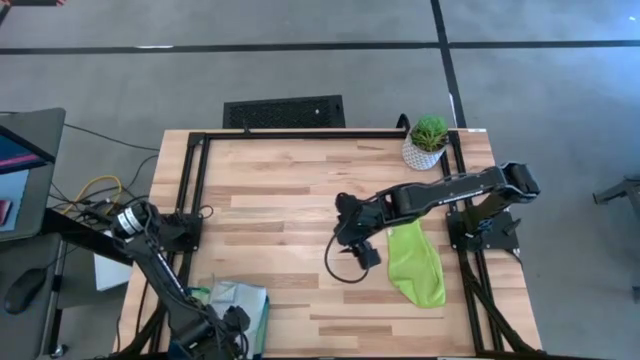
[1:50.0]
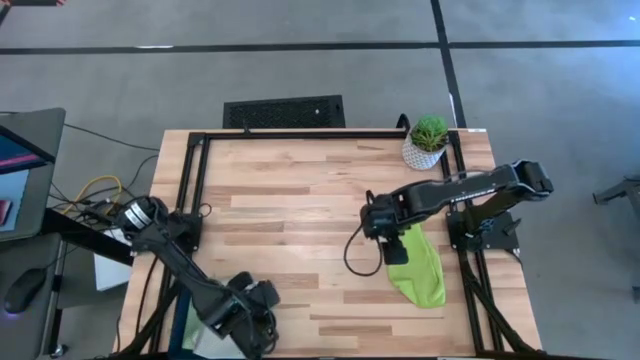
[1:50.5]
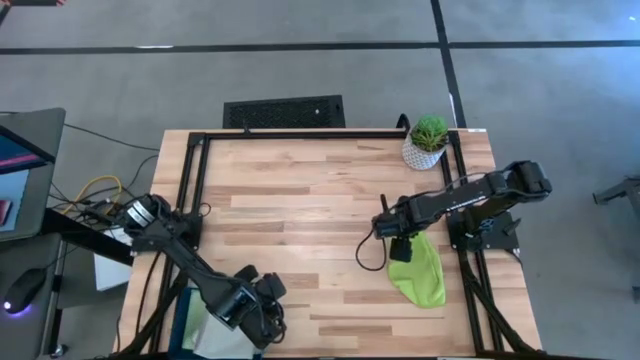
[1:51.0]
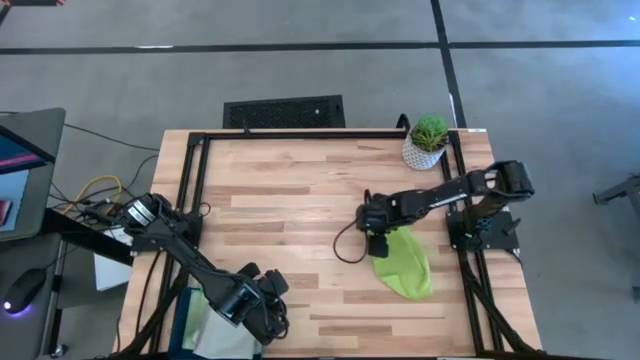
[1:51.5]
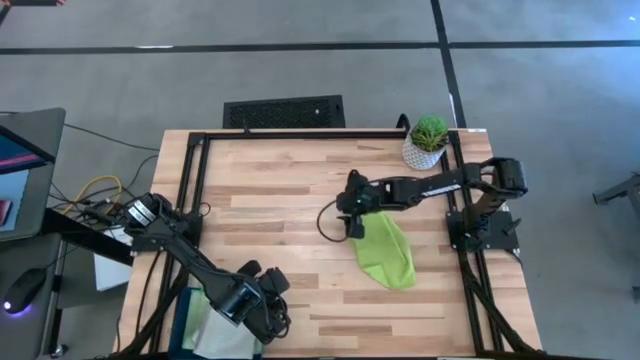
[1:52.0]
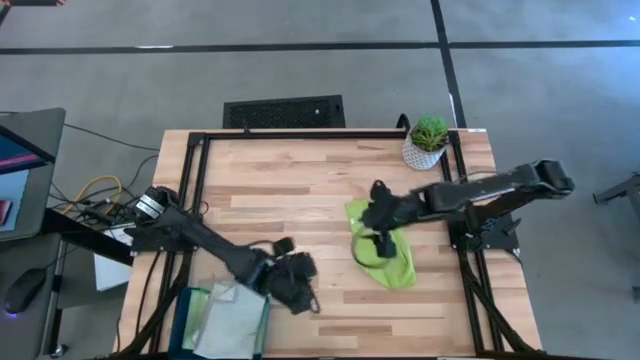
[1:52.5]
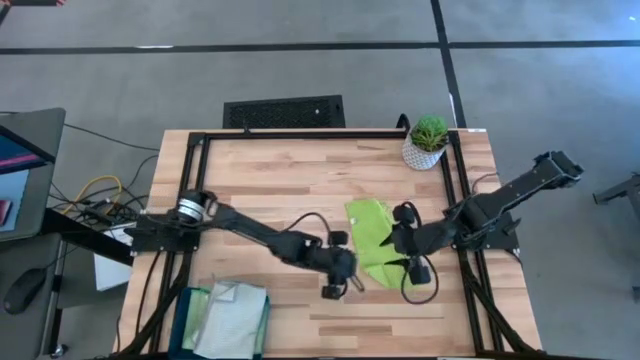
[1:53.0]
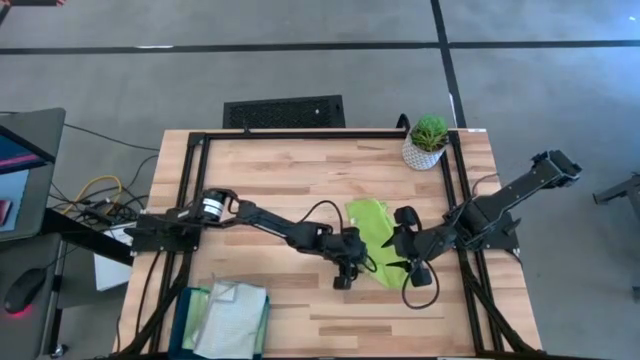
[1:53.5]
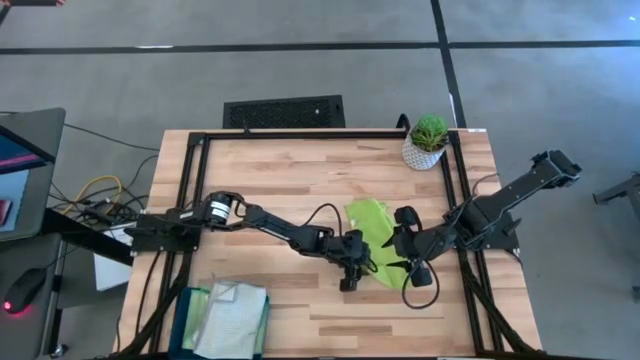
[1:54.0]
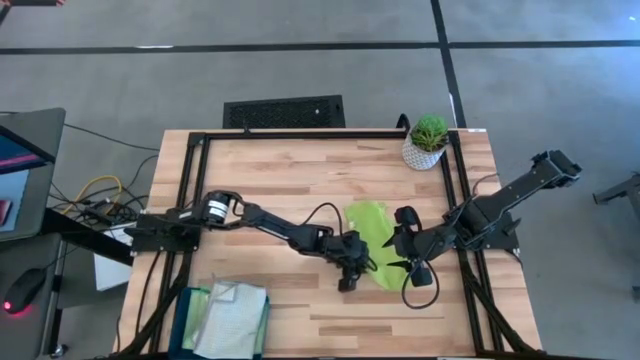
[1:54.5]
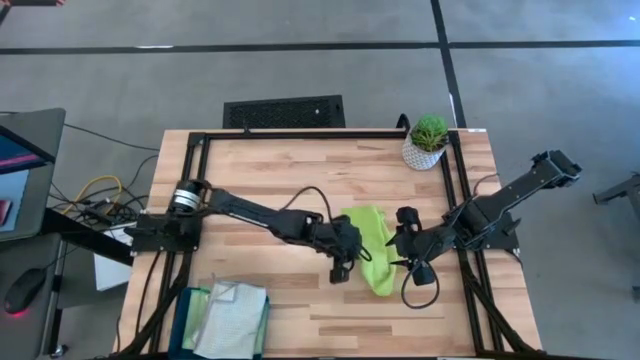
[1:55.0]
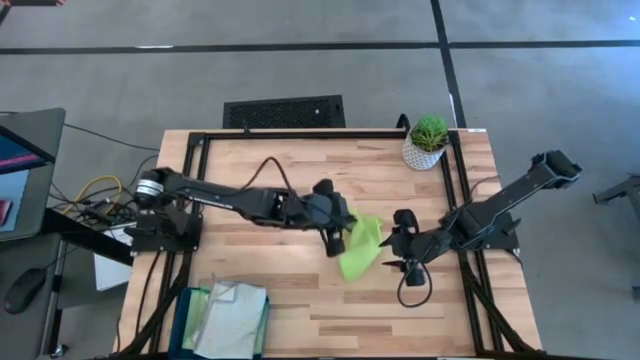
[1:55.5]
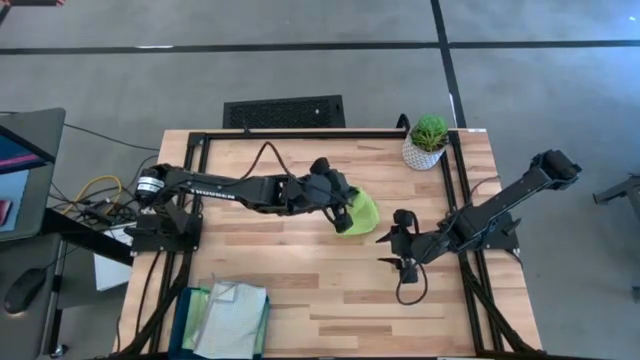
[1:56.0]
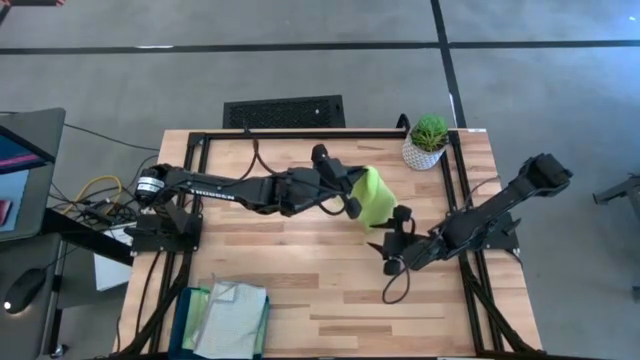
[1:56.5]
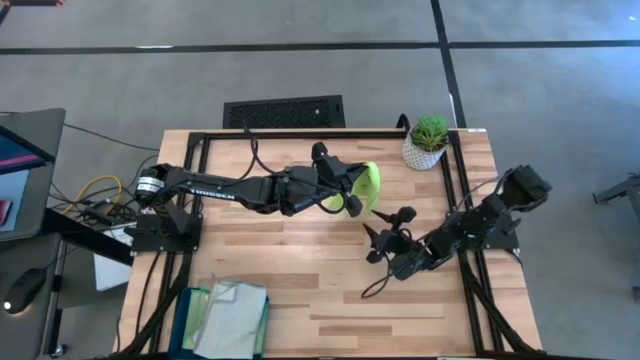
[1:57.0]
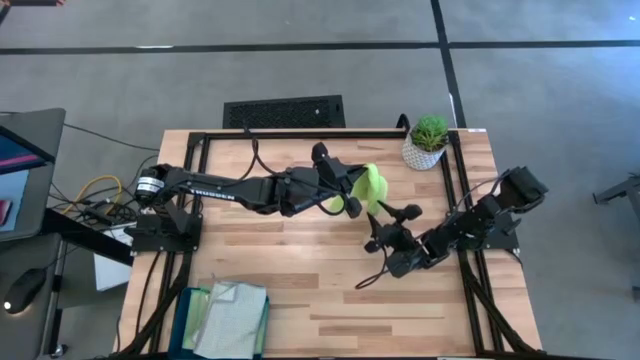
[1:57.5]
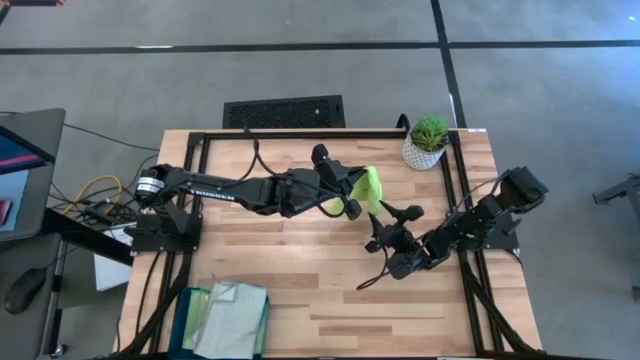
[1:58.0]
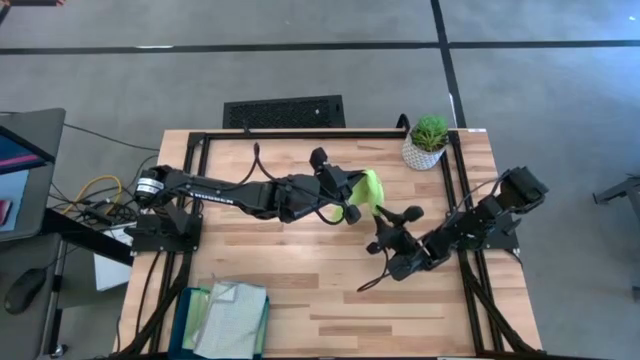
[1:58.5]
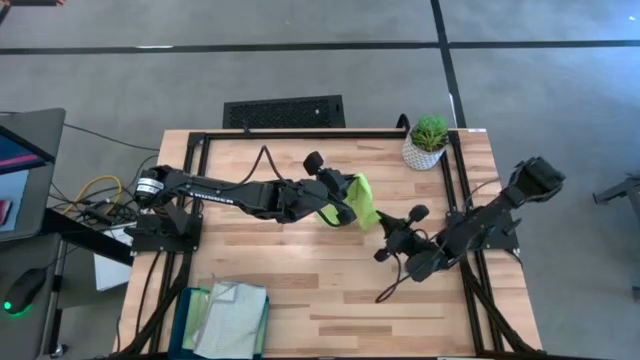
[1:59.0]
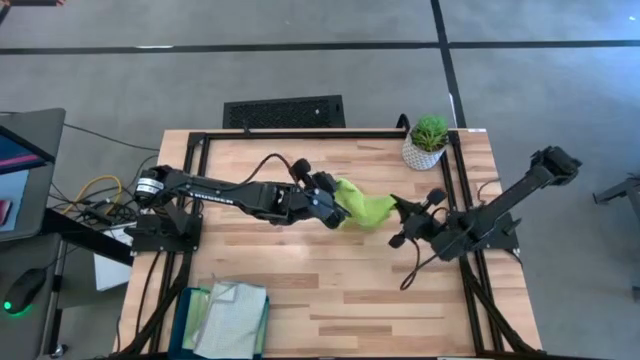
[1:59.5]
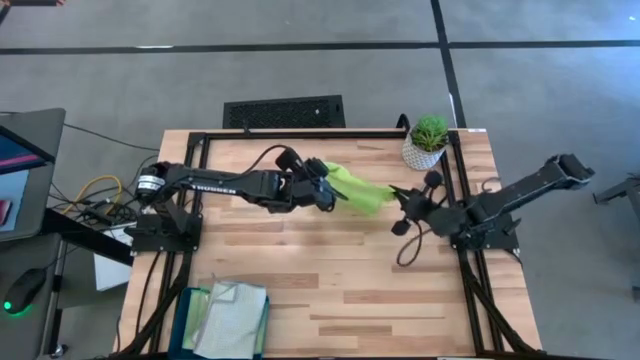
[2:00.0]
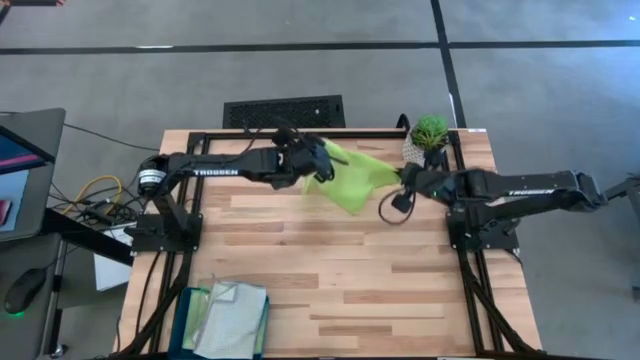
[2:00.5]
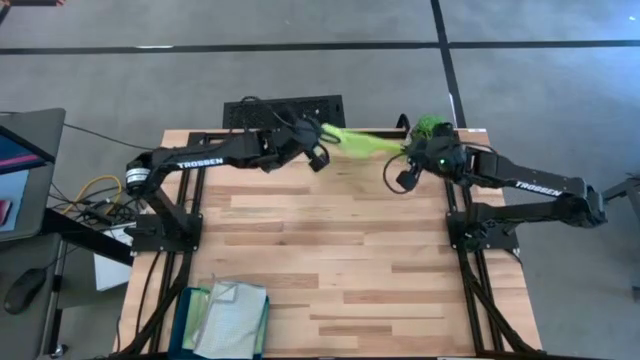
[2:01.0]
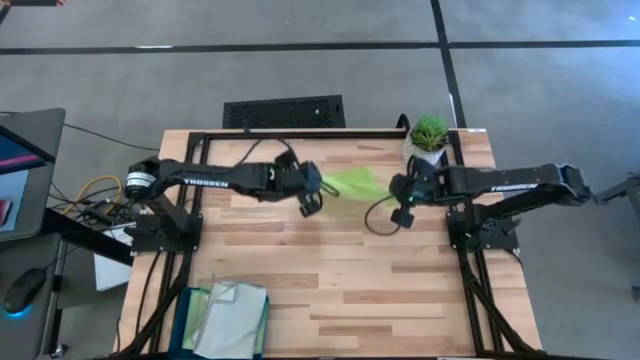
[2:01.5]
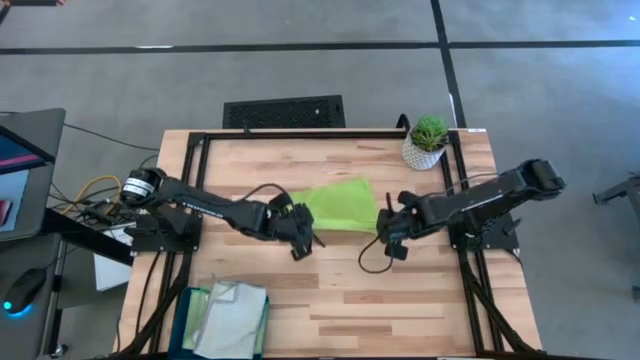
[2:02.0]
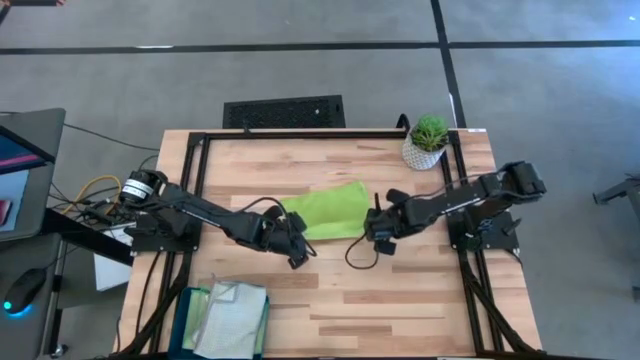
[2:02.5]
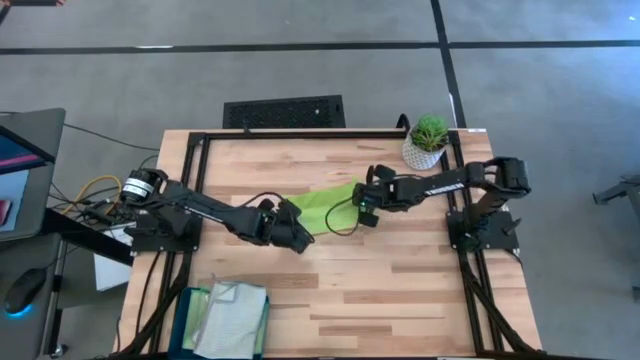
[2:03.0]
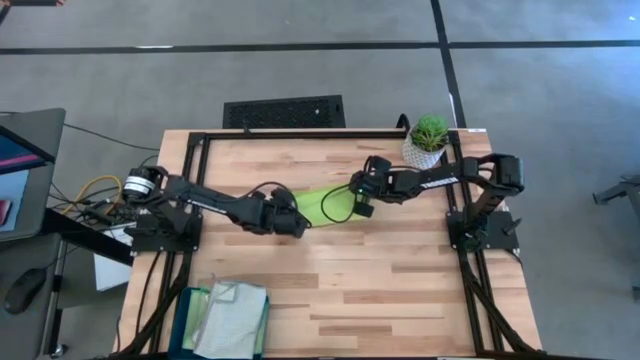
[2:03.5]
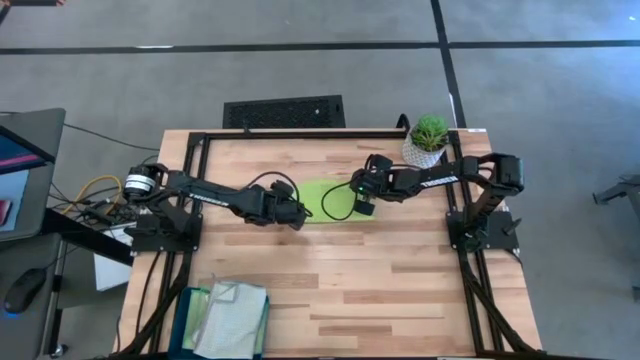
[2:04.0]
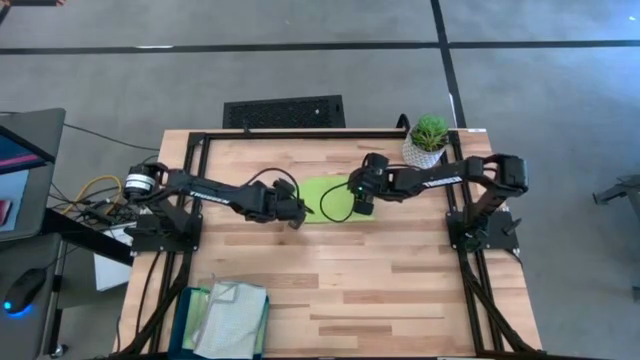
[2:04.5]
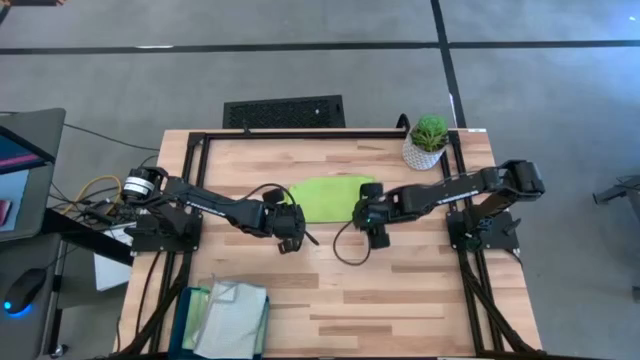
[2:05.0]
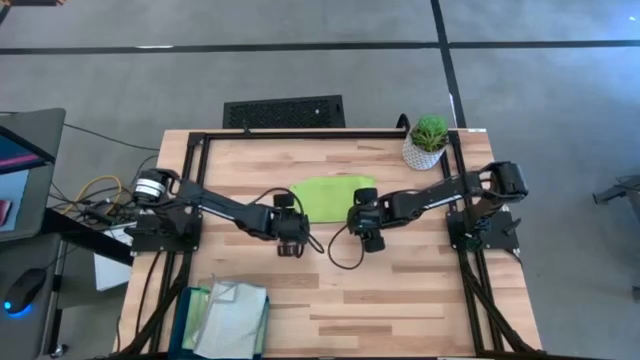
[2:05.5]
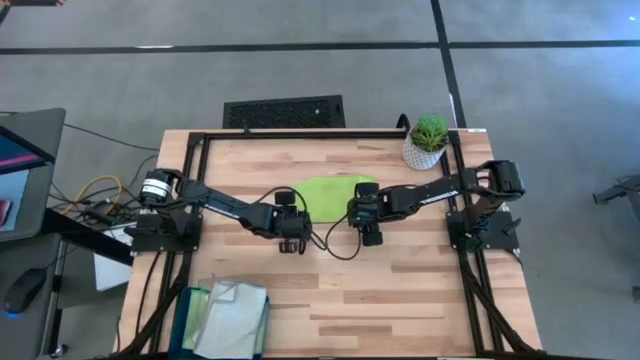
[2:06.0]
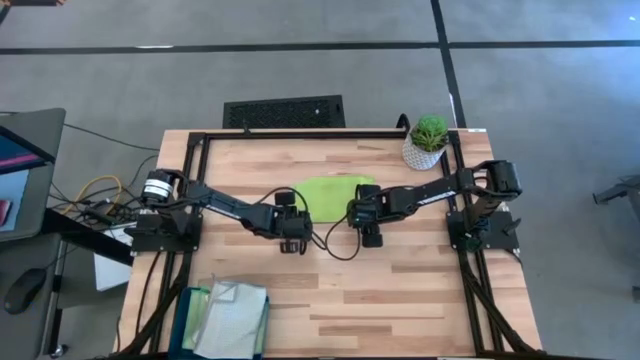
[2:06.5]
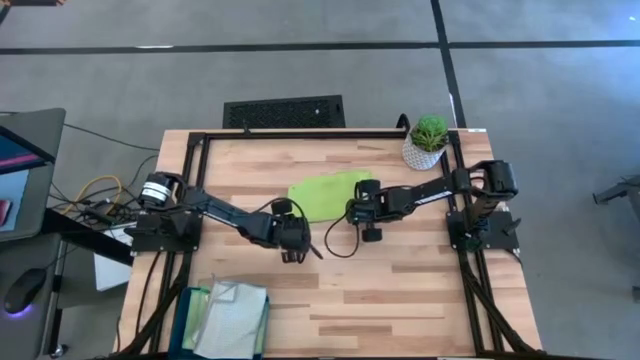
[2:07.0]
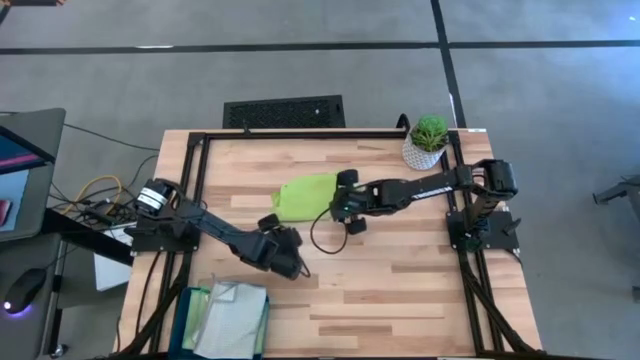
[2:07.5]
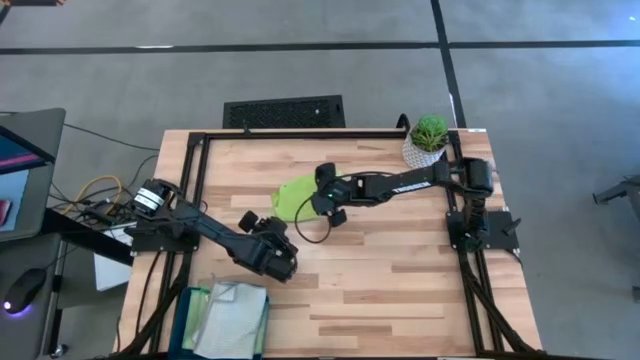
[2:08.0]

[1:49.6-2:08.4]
Task: Fold microfiber towels
Fold the green microfiber cloth

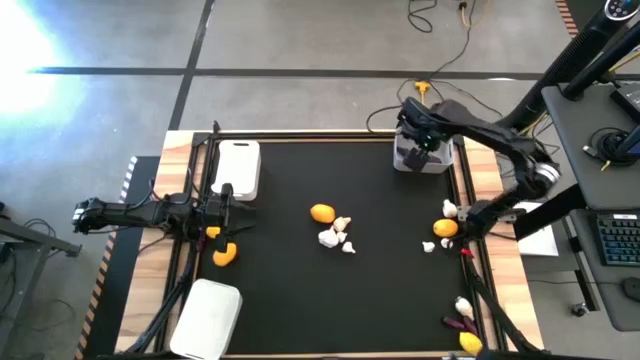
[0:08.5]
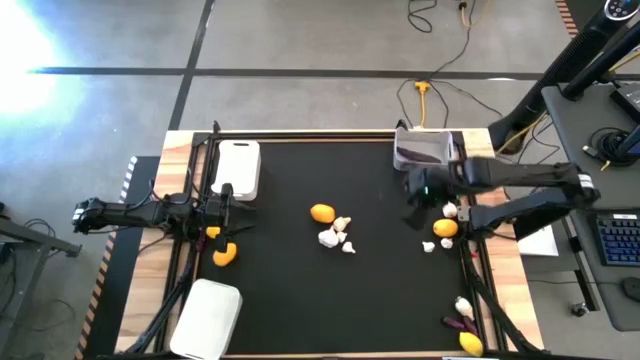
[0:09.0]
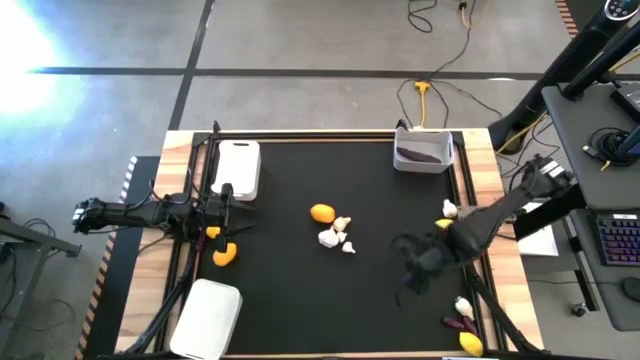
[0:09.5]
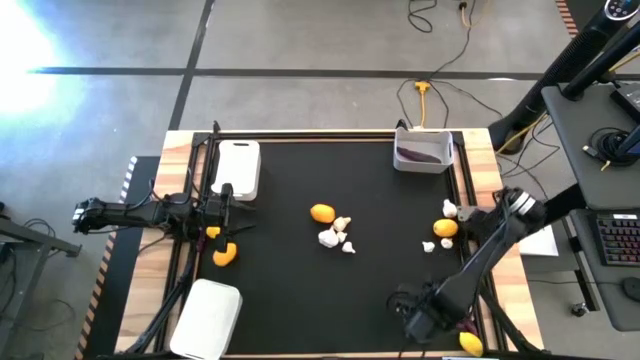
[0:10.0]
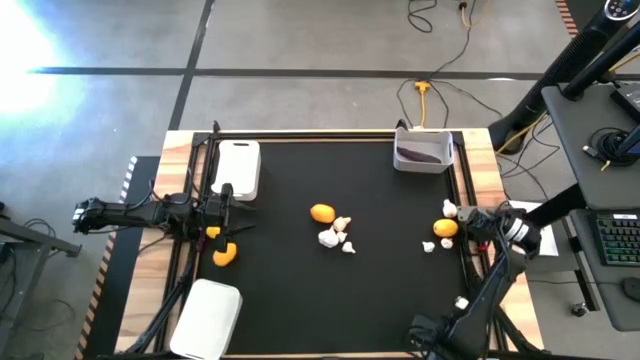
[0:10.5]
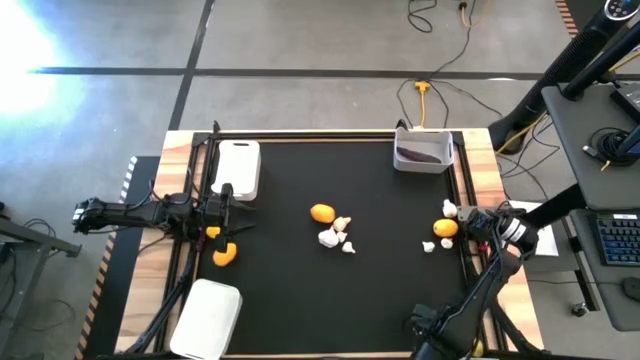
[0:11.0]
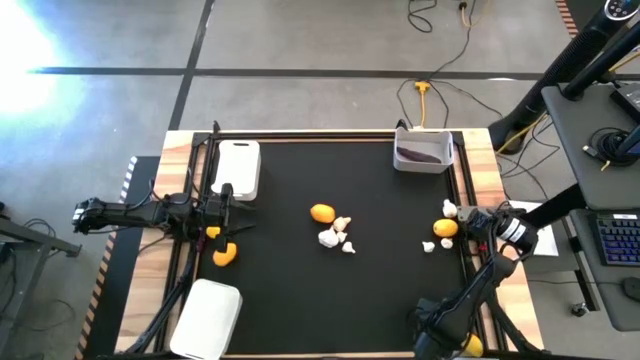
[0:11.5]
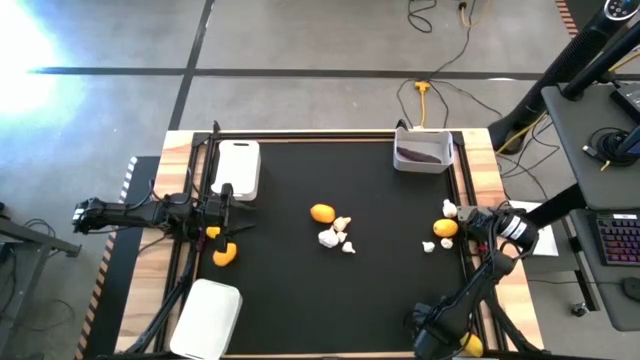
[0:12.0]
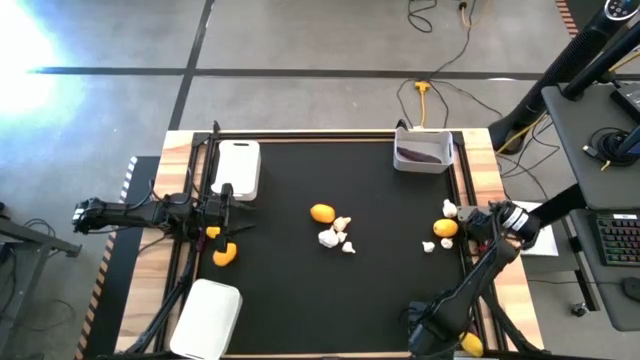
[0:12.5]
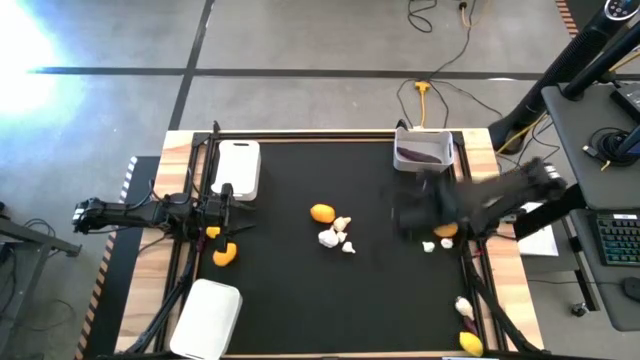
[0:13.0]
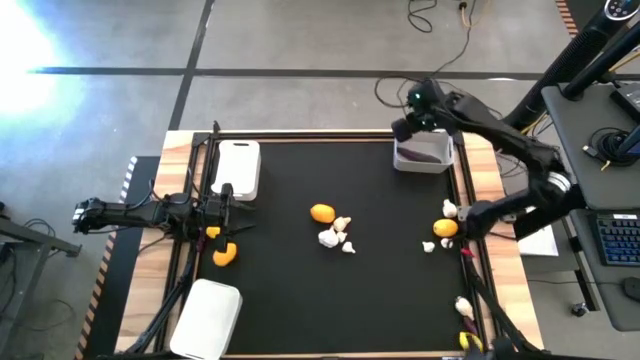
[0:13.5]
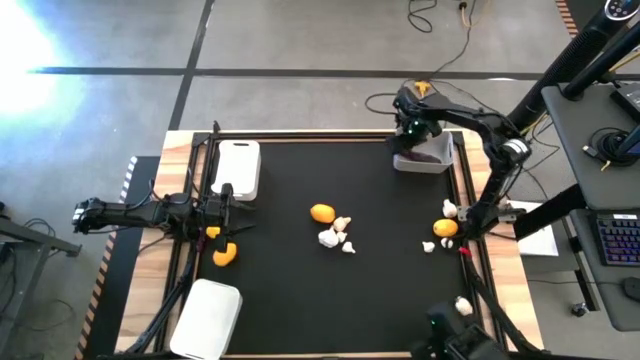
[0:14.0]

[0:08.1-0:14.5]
Task: Sort produce into baskets
Put the small eggplant into the gray bin
